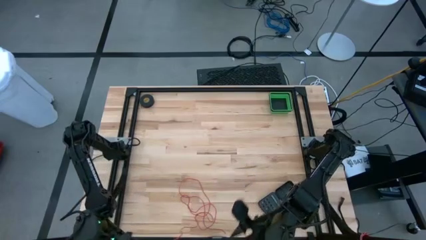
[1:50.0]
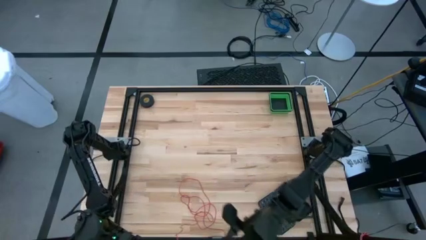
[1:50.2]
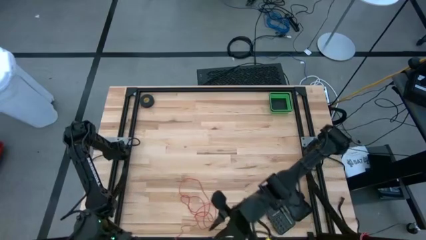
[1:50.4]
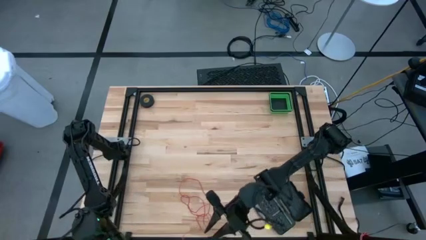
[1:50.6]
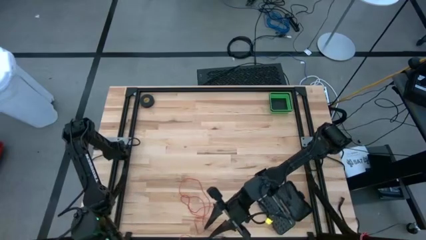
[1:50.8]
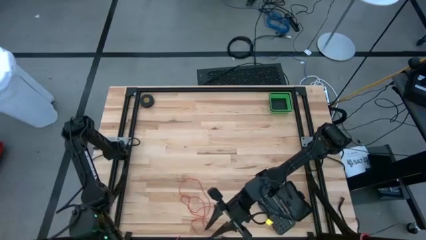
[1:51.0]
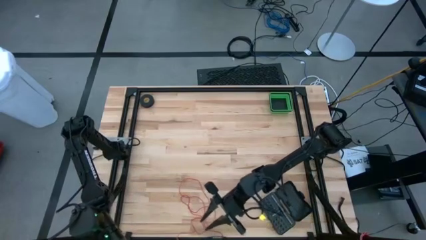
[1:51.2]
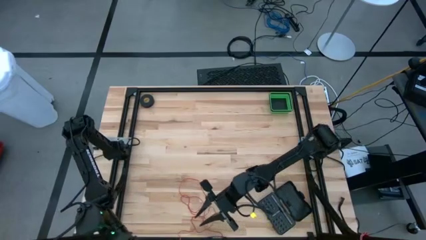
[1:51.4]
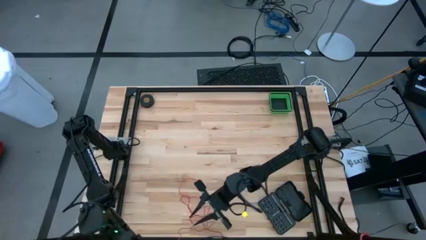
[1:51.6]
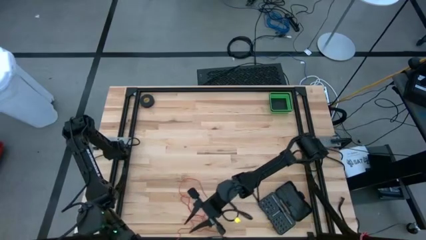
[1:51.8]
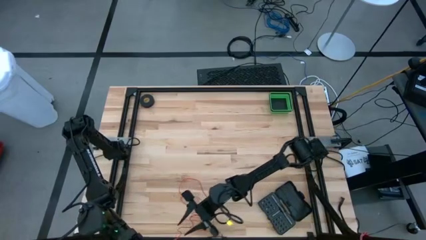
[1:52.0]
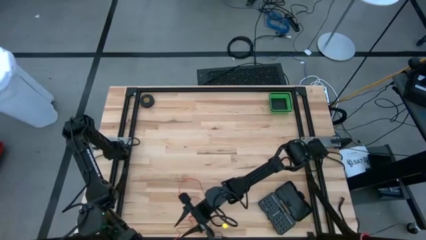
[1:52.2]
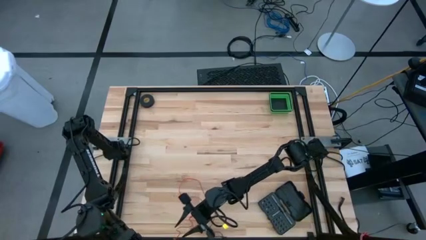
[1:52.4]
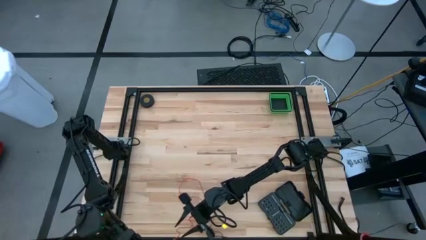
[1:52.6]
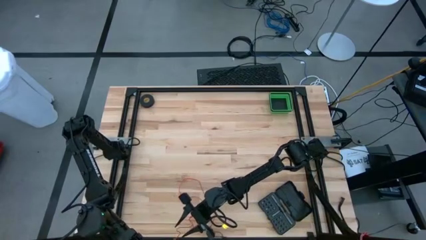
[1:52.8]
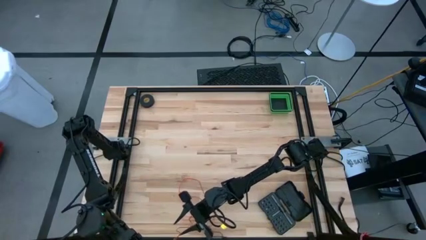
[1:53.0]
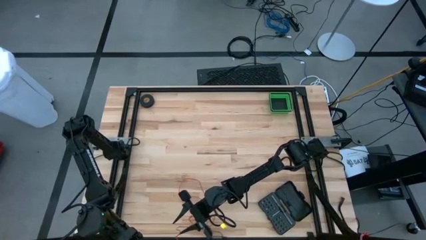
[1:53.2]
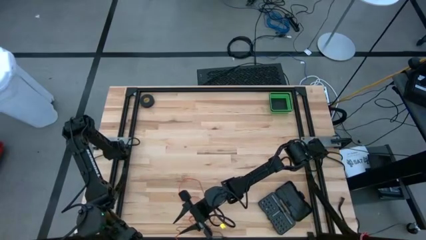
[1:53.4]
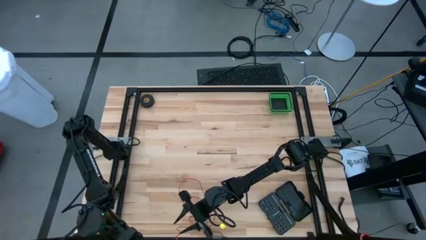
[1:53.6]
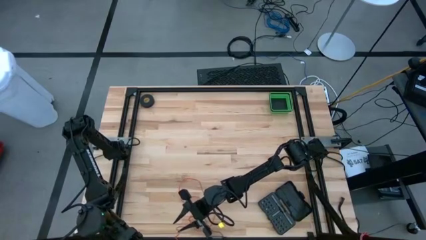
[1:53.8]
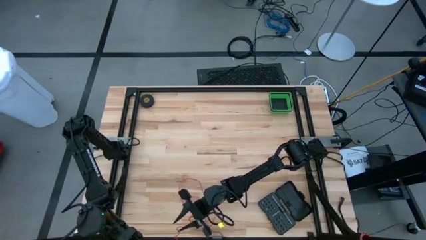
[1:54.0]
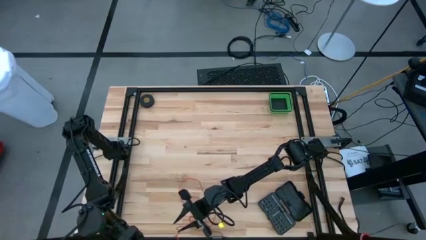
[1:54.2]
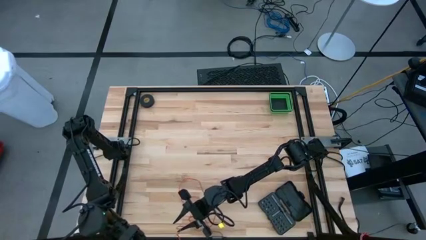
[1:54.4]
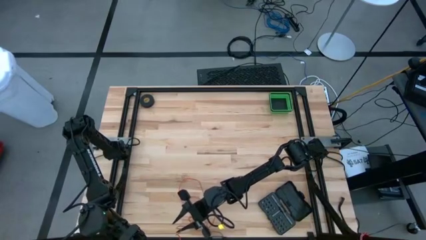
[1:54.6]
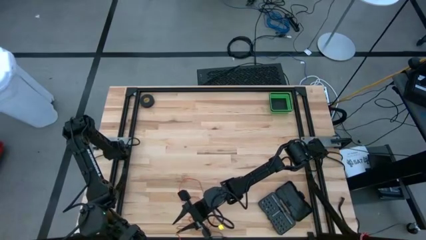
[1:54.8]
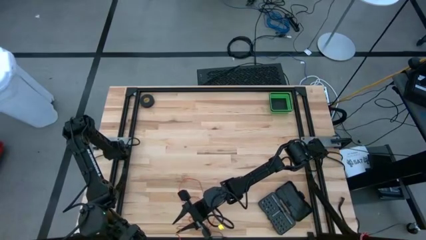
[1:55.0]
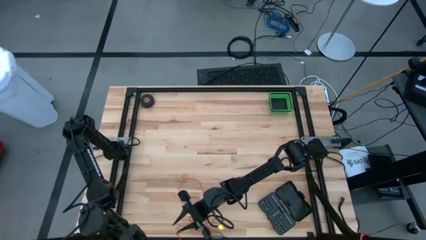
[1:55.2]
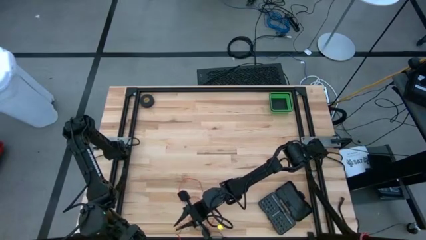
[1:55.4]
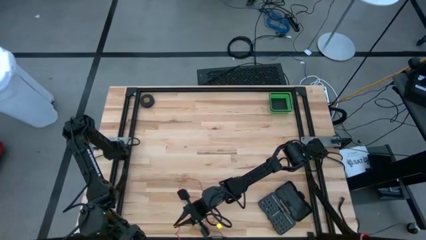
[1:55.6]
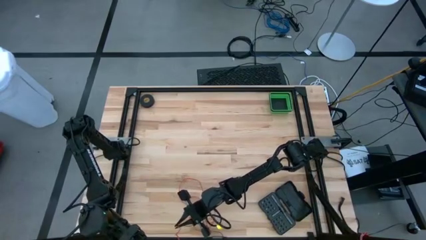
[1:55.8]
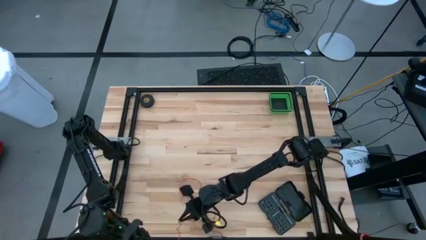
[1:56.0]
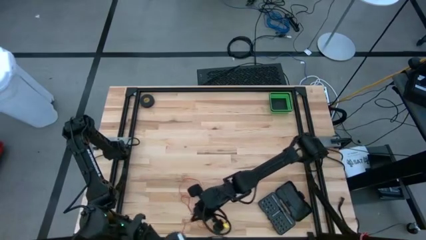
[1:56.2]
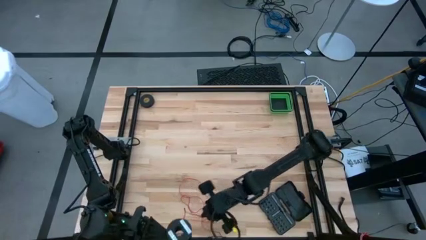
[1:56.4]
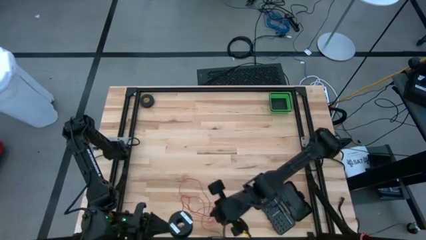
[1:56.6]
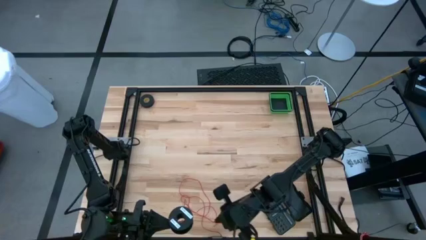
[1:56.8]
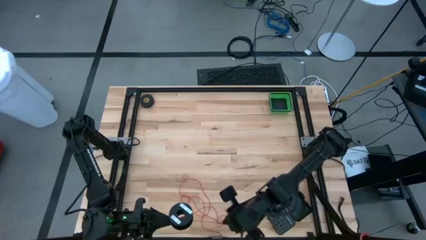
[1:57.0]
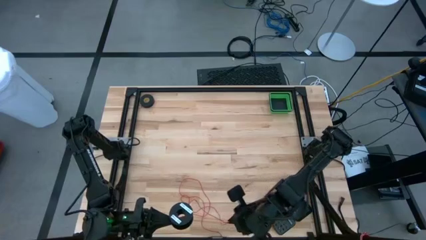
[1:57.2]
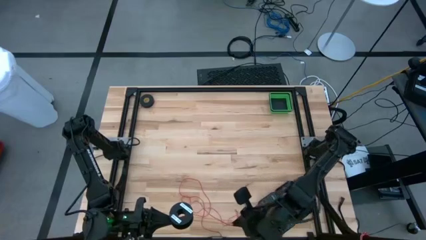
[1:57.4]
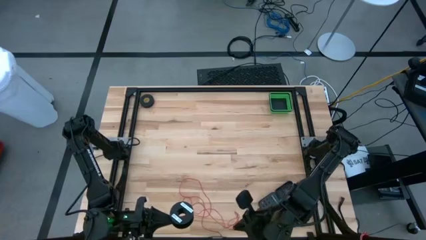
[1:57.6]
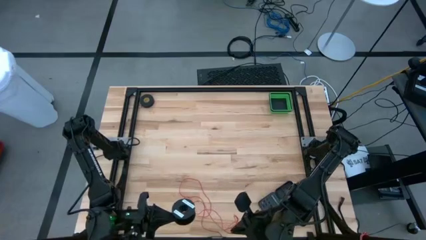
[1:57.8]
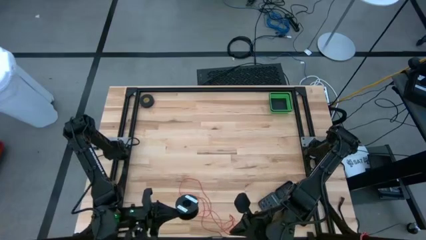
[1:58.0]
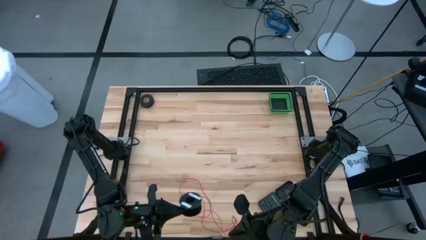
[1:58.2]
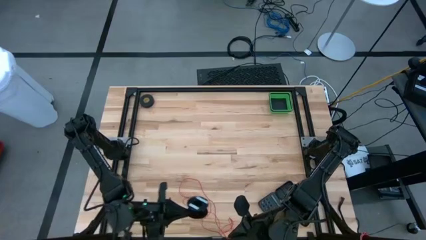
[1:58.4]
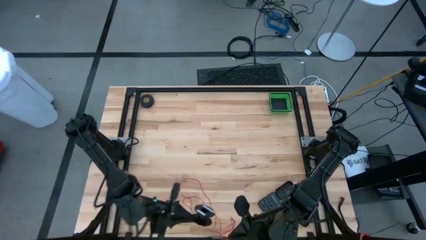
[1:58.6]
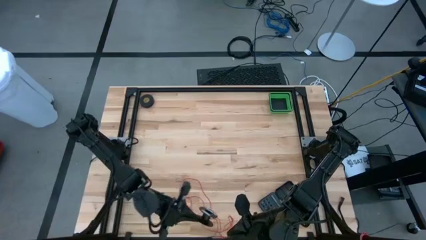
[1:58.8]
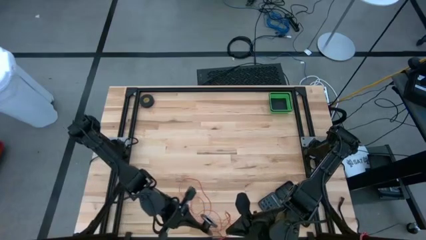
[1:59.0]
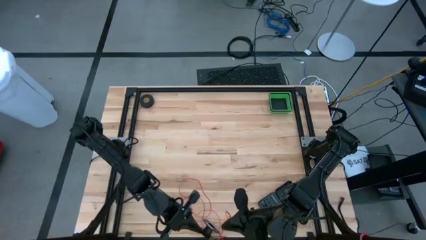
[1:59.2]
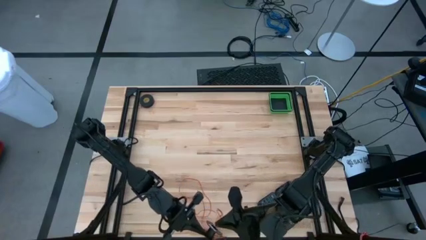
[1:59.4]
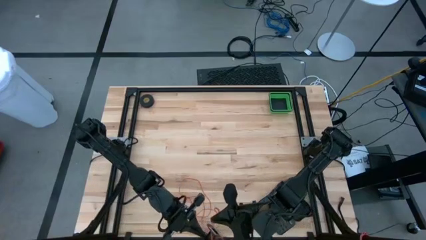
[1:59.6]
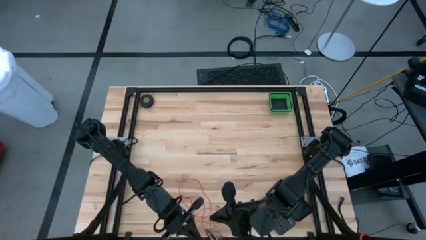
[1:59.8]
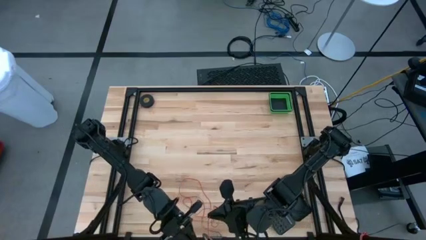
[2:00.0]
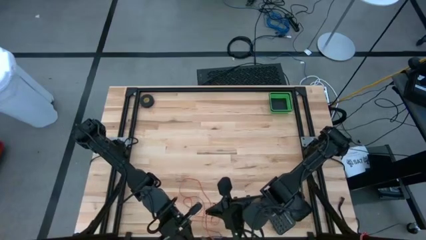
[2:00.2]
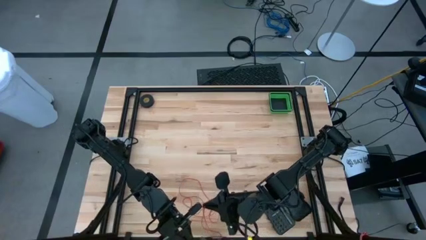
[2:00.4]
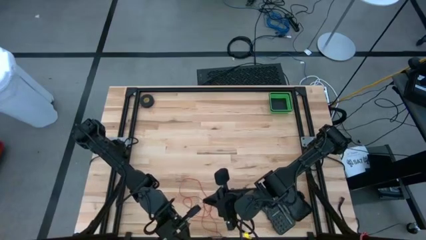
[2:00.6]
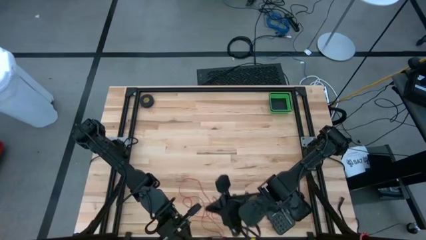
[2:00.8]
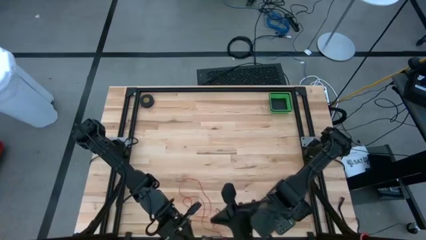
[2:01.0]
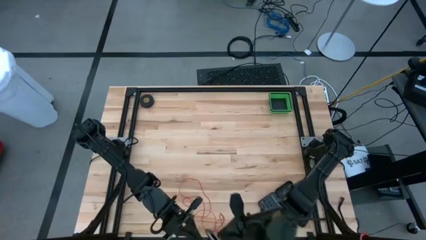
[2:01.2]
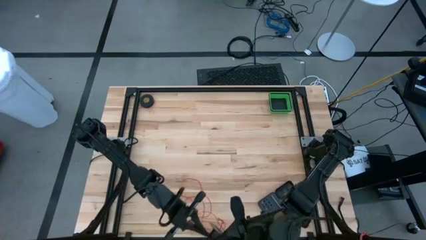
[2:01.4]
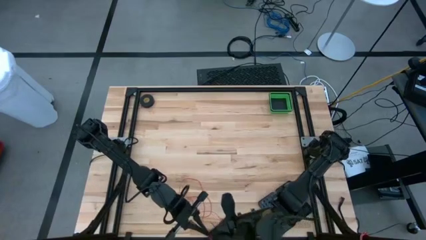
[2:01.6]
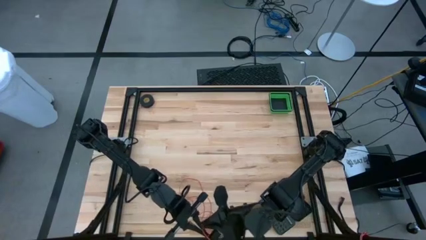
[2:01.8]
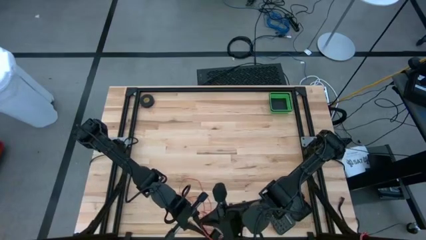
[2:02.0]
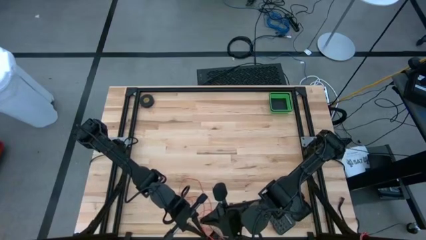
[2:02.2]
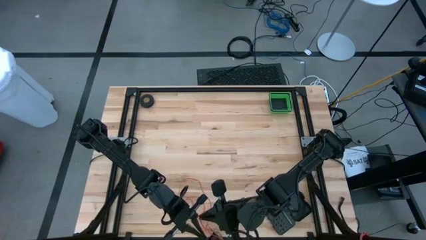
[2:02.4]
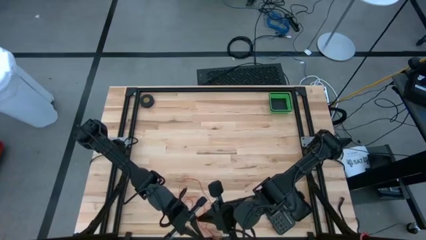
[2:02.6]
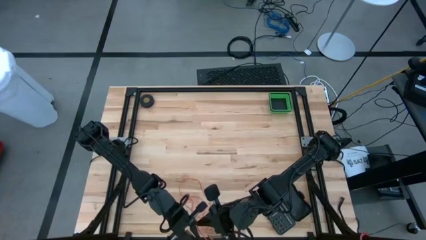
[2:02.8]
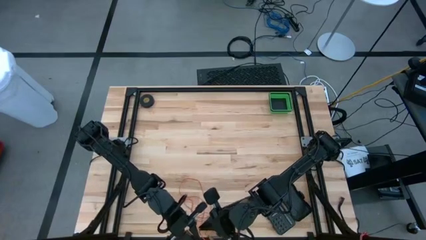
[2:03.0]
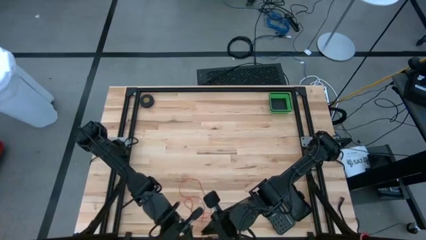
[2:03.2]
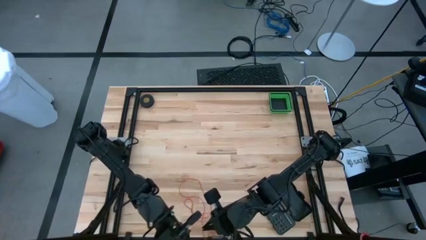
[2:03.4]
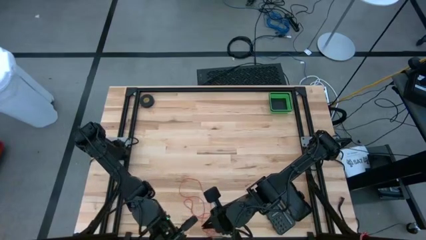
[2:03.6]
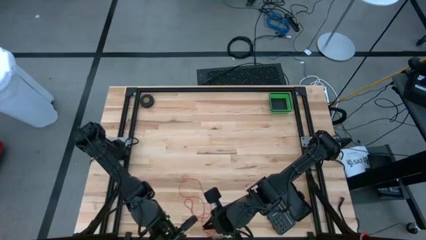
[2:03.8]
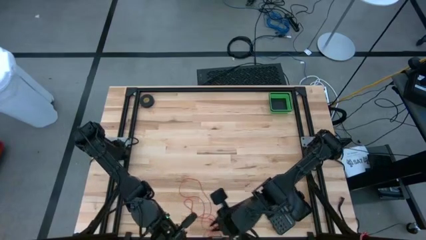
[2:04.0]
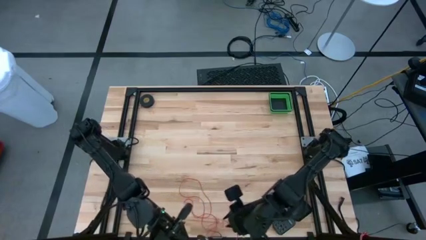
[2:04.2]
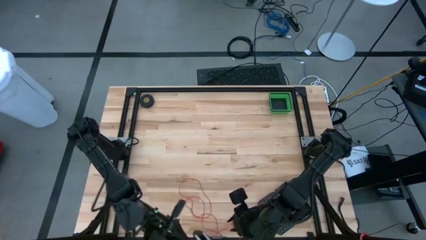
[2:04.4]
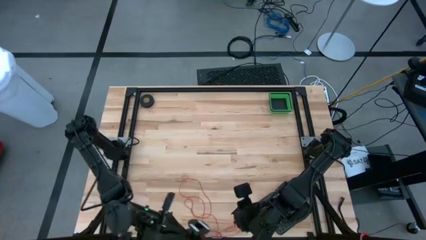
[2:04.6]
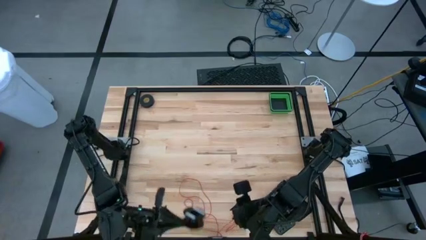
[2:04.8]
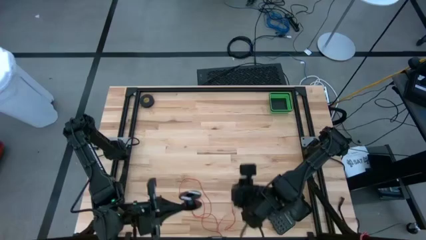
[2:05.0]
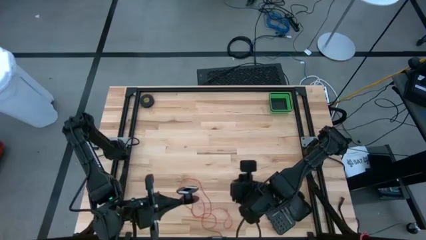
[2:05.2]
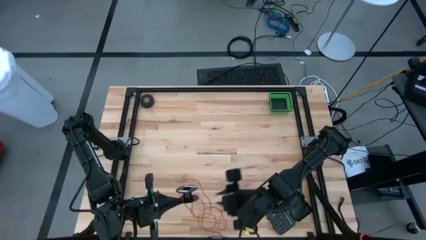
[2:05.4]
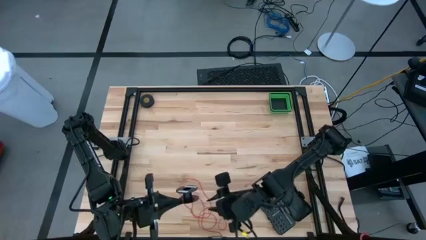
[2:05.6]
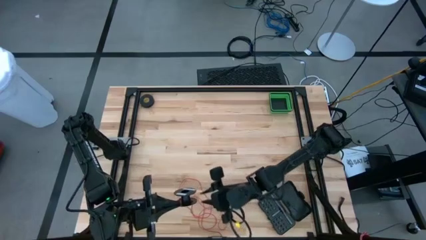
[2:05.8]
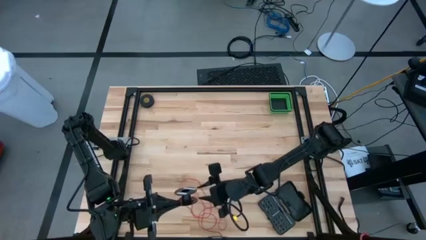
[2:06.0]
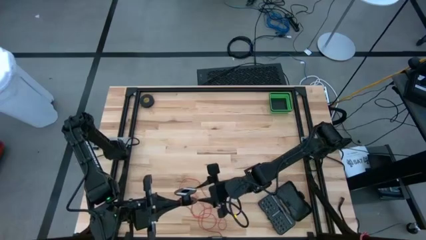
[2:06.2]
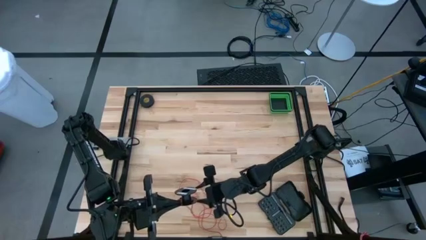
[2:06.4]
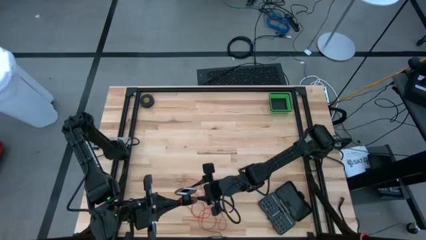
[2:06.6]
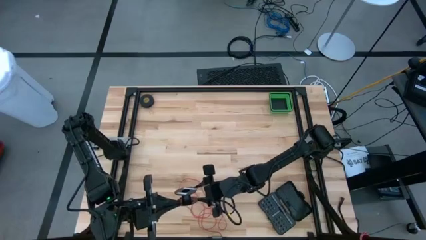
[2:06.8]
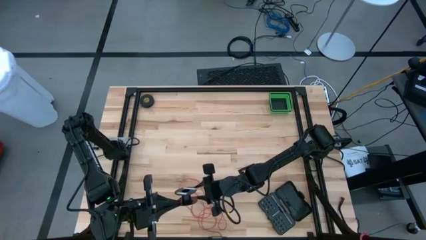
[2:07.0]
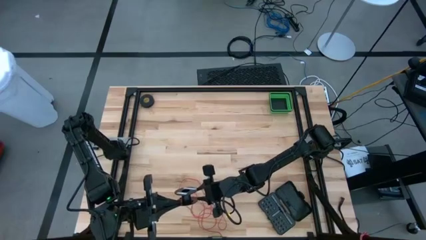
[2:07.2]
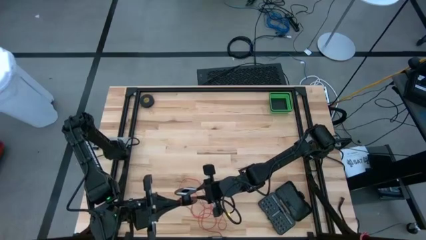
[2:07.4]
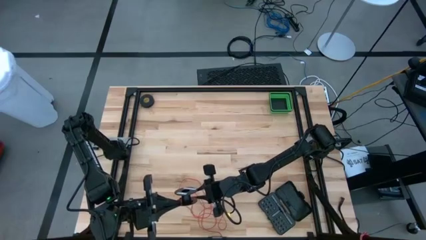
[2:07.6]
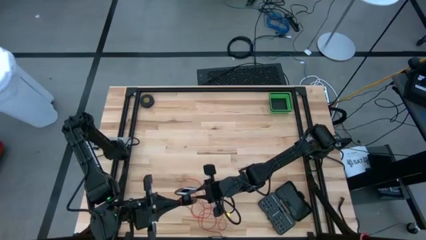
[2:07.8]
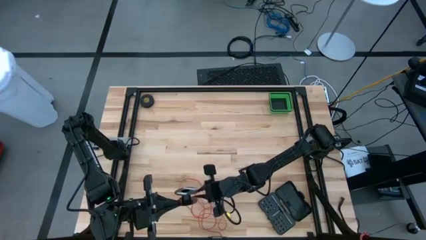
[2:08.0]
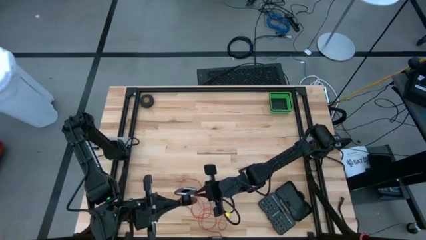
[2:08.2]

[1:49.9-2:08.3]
Task: Coil cords
Coil the red wire on the black spool
